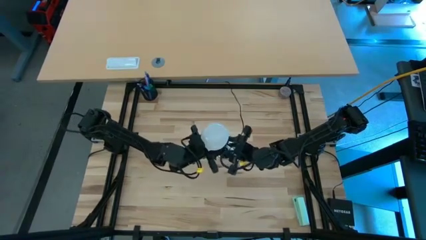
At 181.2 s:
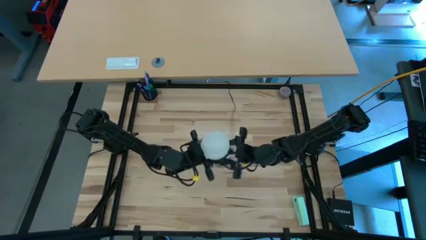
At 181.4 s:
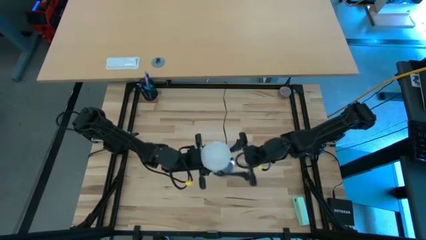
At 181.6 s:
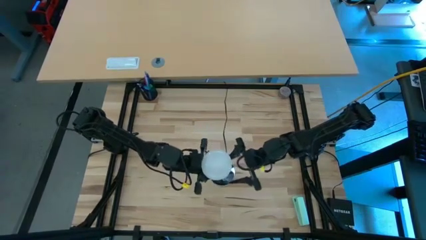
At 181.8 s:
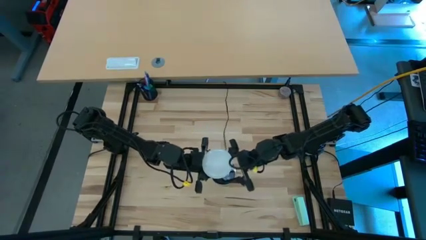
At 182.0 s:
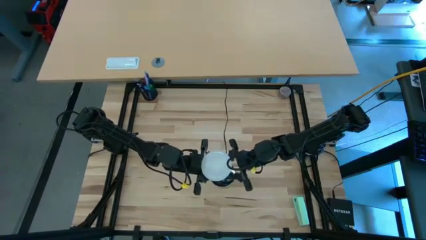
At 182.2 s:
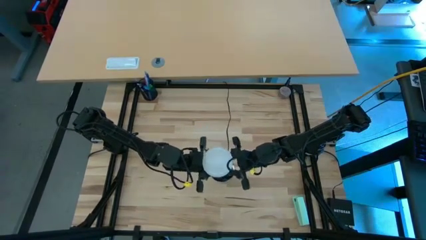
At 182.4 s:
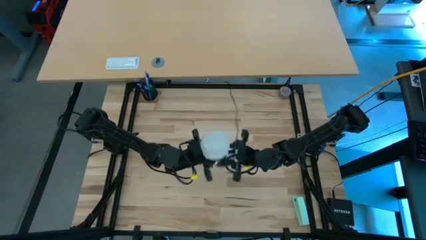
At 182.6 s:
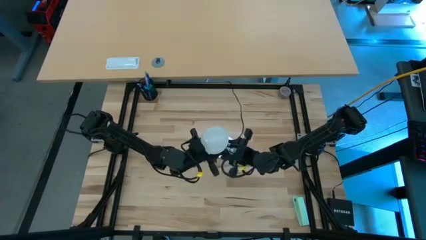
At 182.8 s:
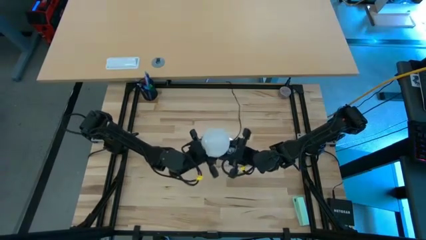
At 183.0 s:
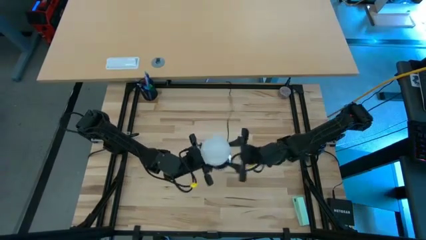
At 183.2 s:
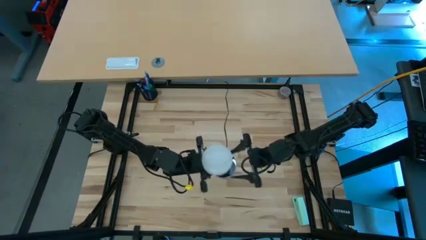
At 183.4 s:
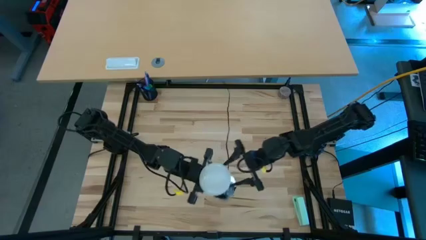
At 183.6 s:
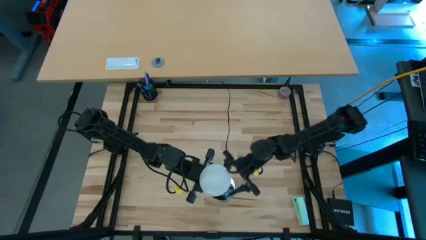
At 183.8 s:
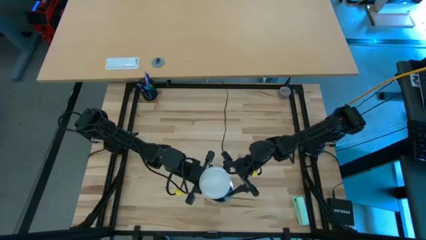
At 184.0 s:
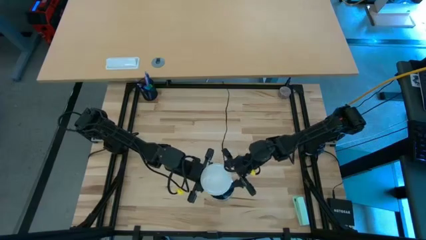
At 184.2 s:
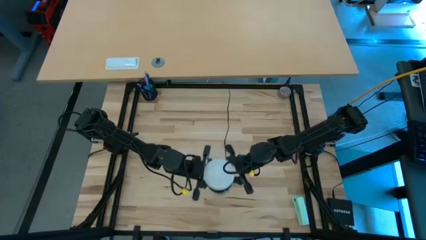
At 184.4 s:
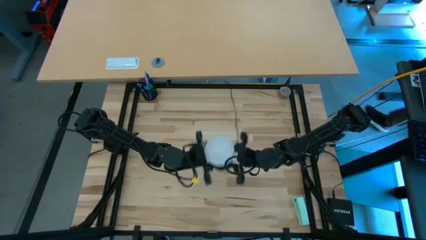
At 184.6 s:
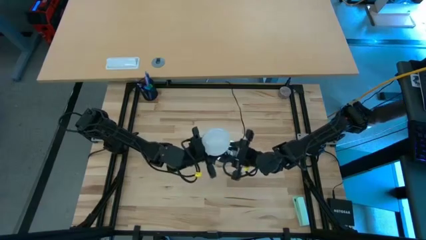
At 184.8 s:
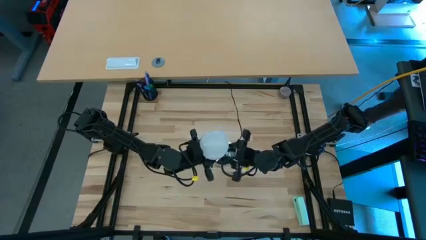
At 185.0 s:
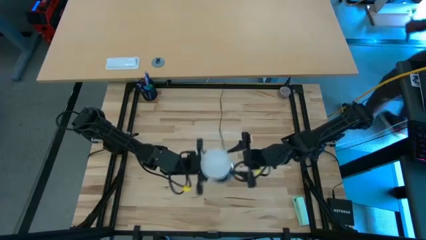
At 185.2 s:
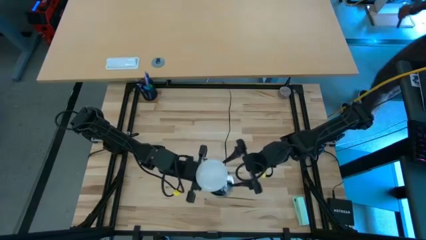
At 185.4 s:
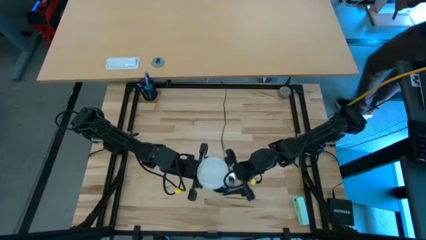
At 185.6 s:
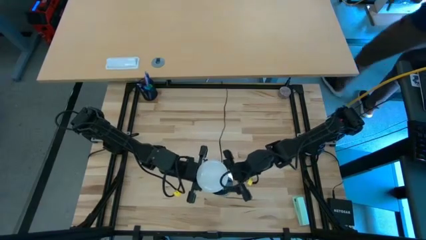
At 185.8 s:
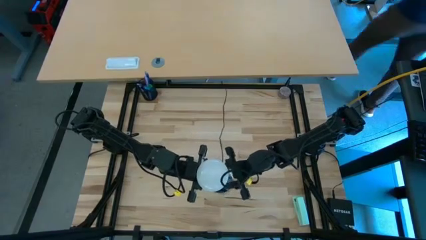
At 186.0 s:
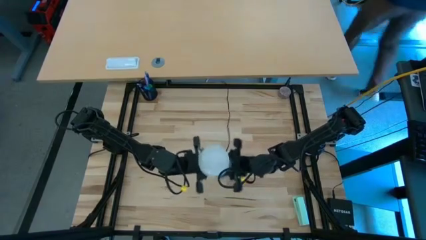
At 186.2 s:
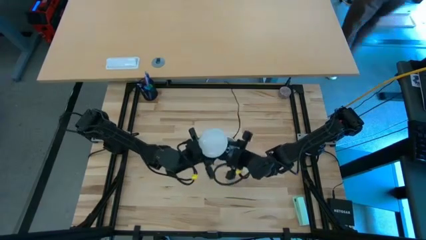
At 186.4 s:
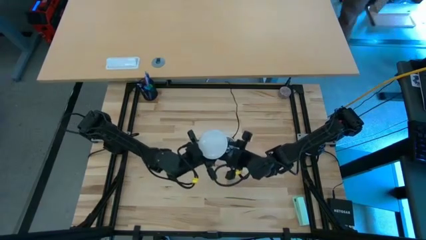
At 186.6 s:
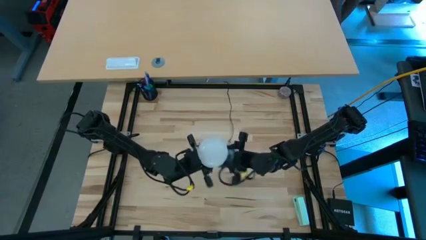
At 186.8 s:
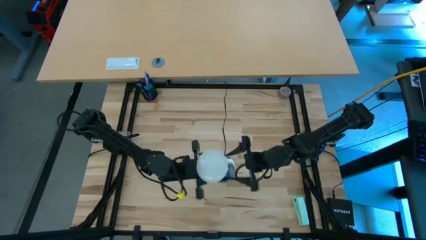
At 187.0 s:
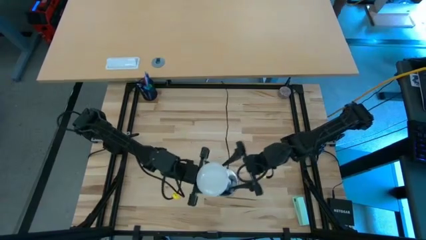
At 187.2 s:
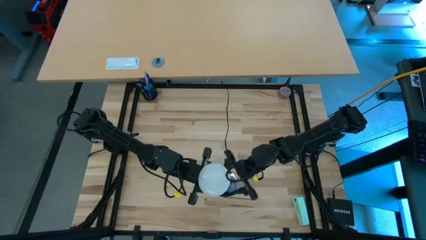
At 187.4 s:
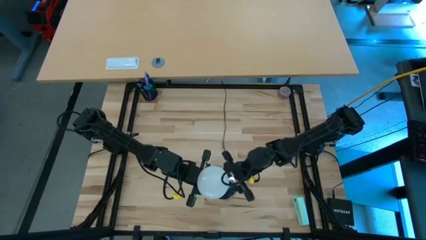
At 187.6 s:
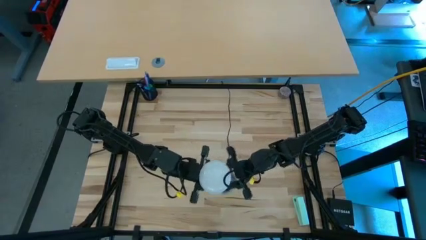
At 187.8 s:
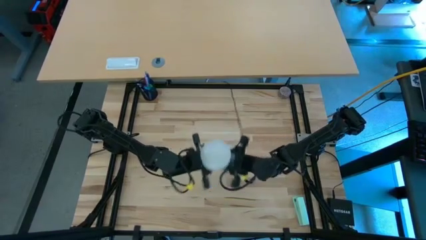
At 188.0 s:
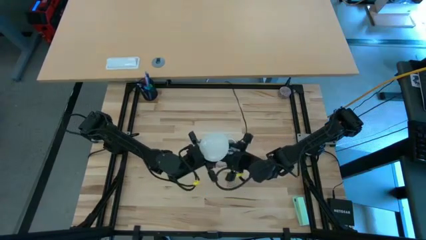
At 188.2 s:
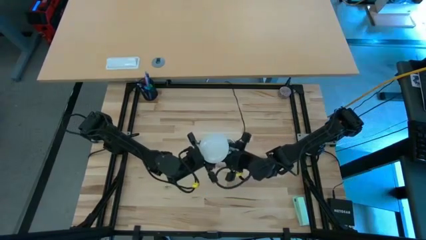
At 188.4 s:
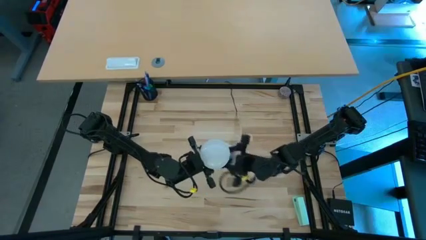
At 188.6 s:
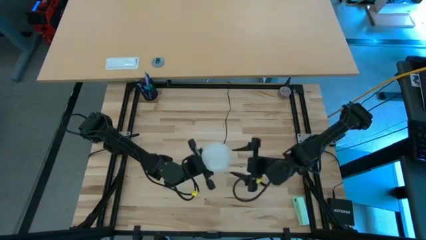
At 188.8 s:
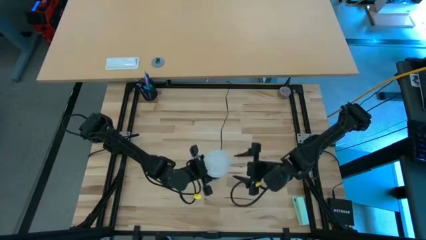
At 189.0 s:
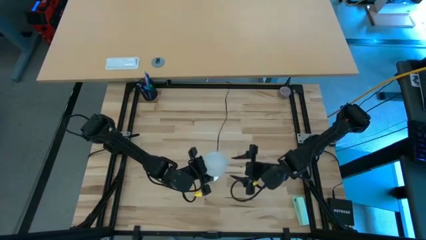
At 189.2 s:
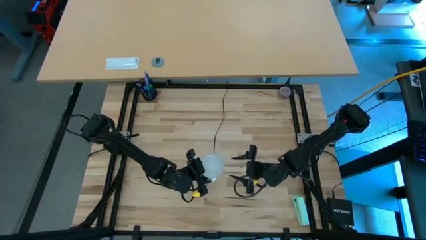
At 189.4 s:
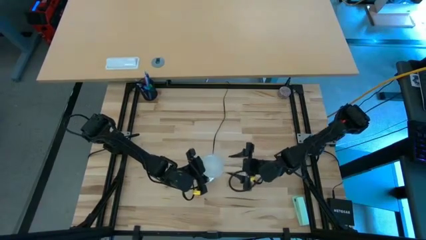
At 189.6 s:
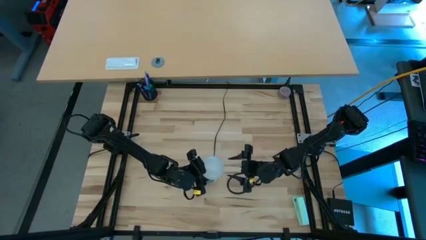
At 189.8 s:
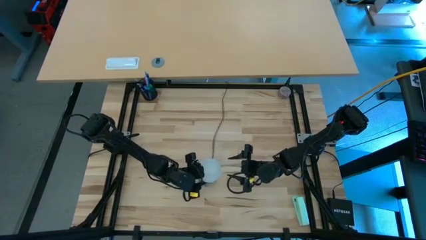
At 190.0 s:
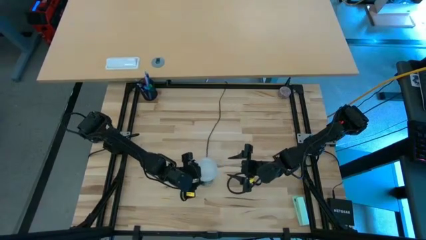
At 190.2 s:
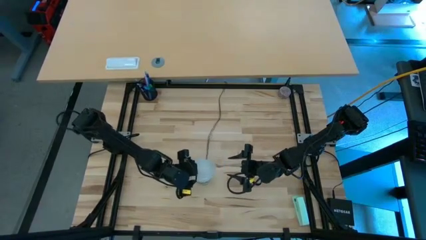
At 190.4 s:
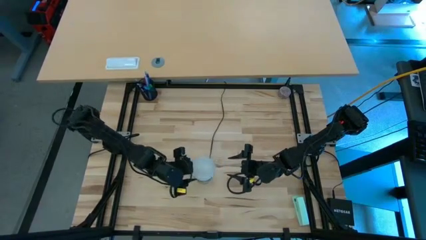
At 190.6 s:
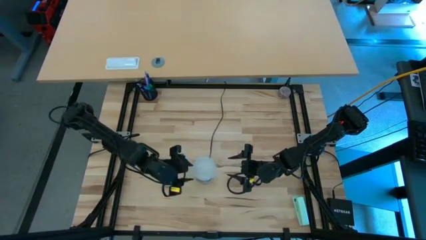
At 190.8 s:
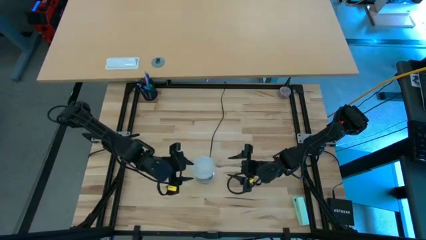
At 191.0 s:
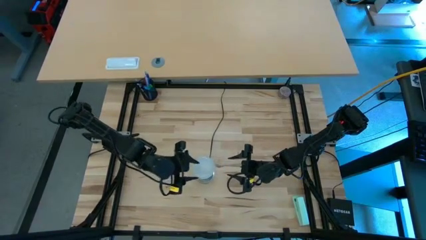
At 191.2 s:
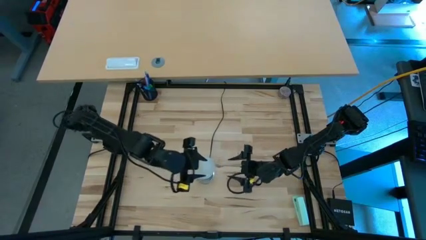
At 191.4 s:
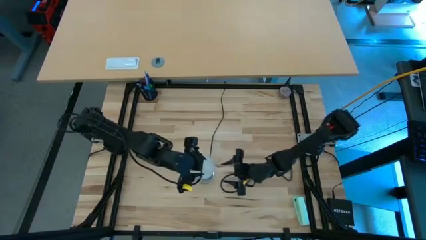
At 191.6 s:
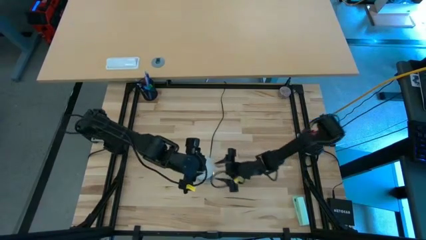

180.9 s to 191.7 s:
Task: Screw lightbulb
Remove the lightbulb from the lamp

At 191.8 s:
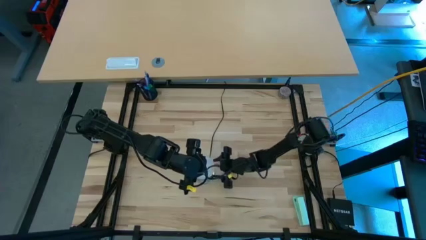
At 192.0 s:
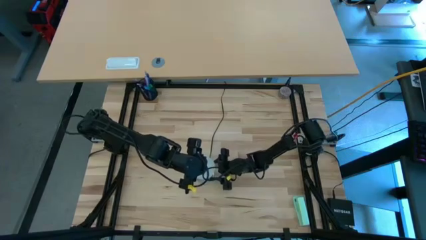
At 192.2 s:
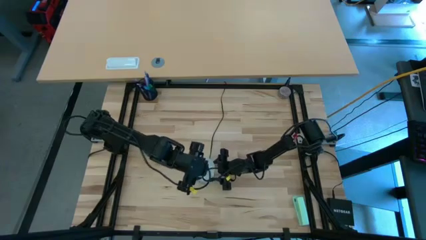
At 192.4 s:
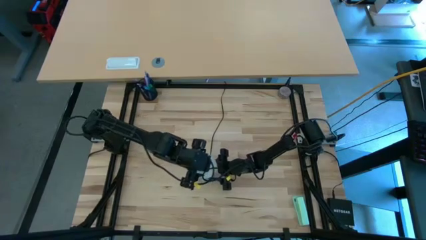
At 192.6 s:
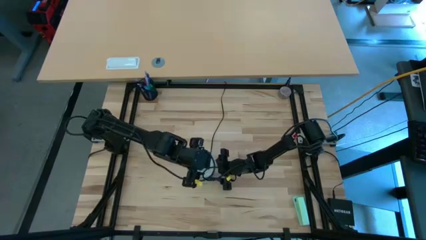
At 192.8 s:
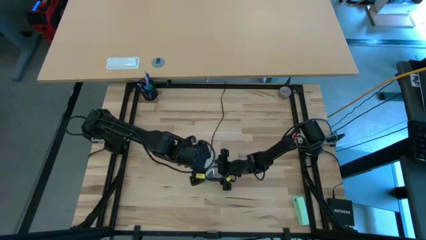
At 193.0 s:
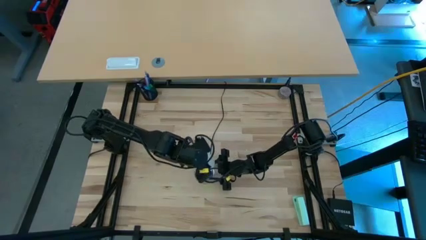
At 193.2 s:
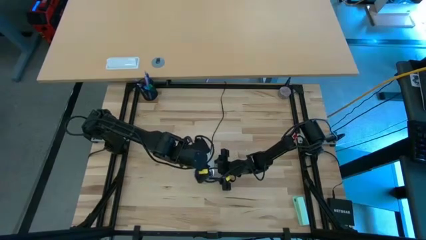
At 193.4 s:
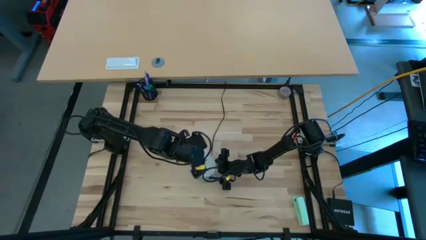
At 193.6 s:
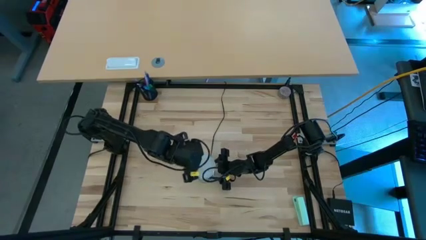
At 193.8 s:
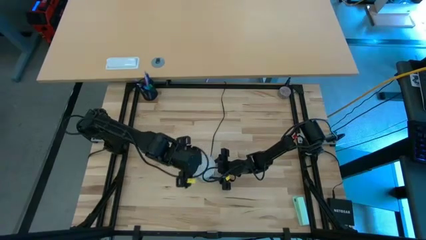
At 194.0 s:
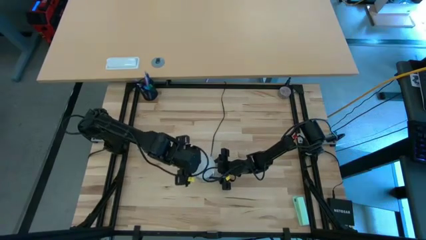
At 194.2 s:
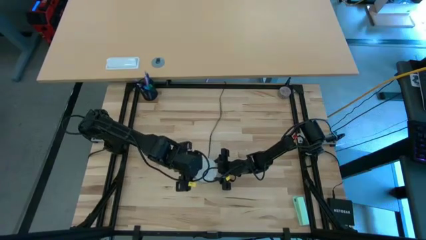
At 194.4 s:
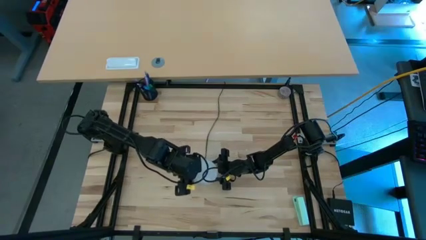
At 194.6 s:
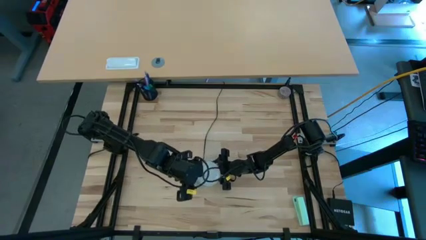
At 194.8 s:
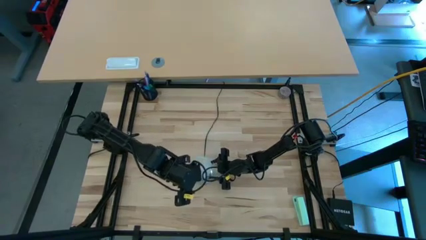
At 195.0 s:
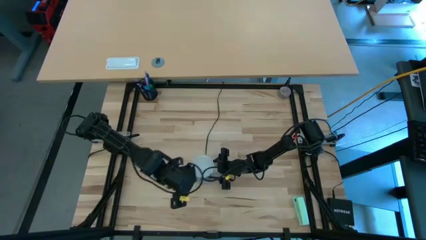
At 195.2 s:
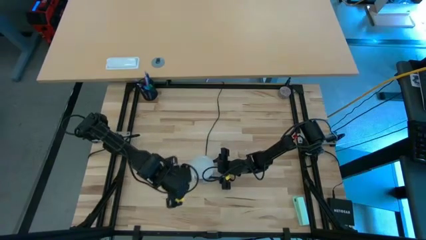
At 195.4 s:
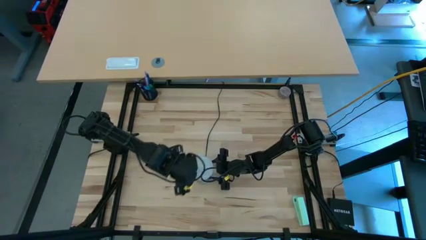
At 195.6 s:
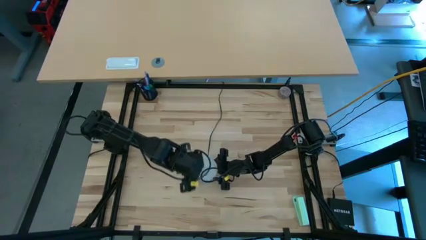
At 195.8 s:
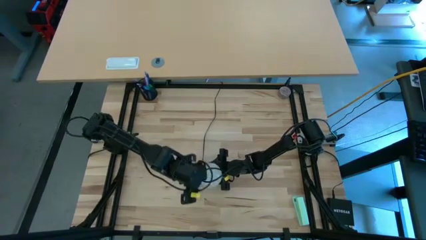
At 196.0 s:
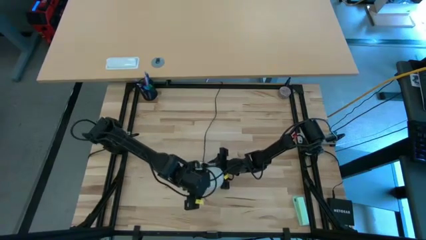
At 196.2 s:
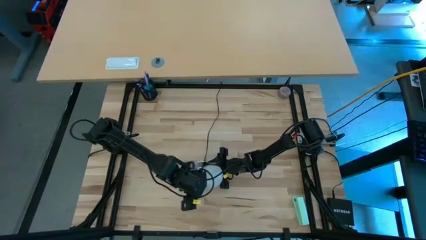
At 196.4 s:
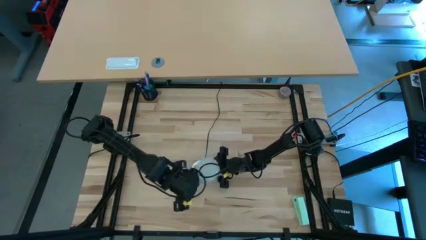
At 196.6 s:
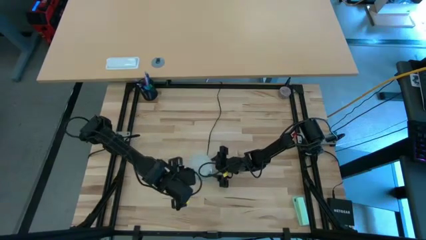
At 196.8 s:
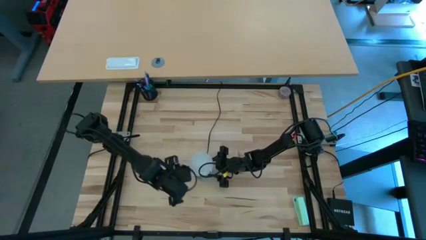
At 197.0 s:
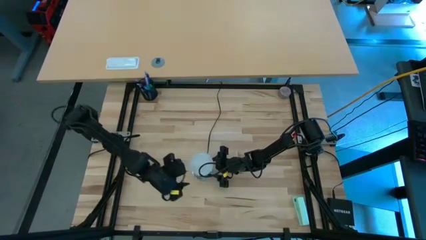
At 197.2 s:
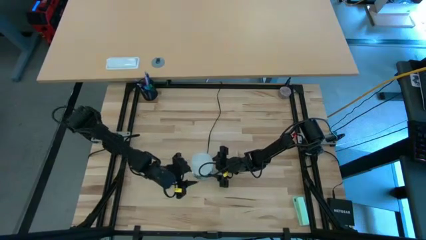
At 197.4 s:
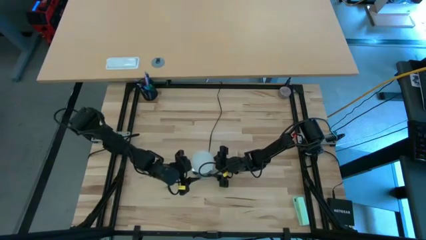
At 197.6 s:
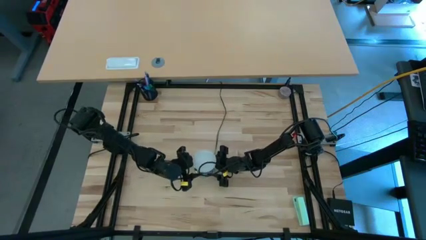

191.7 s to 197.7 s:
Remove the lightbulb from the lamp
